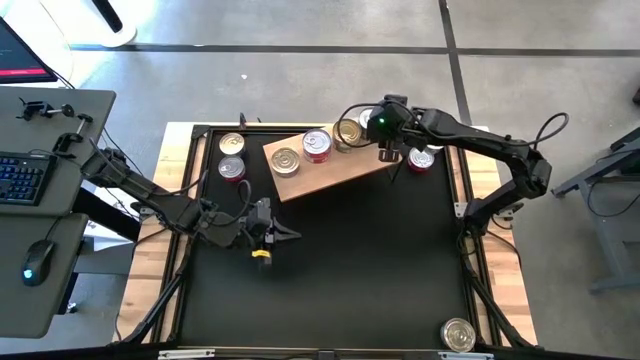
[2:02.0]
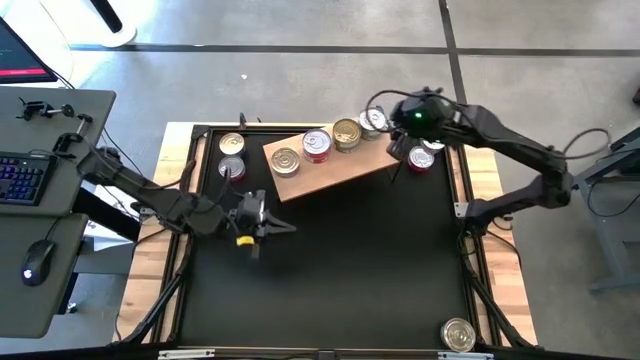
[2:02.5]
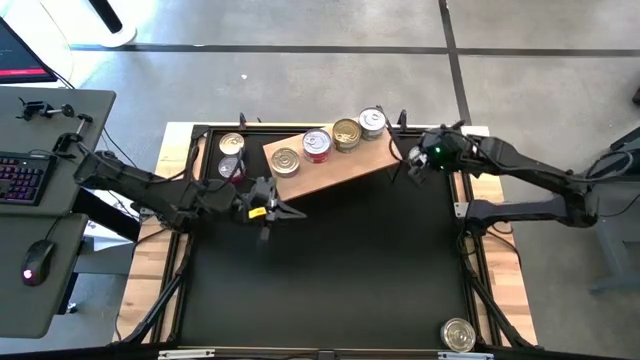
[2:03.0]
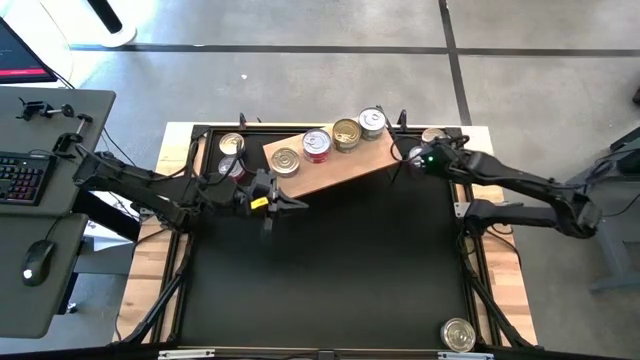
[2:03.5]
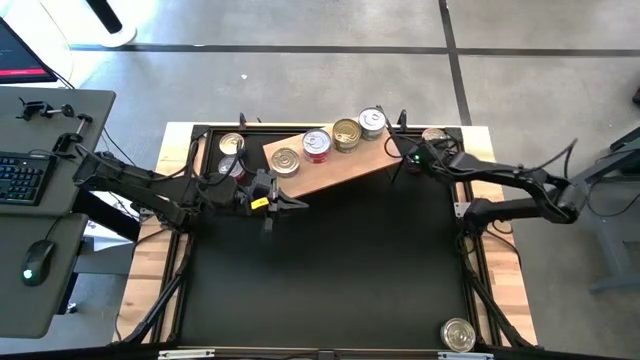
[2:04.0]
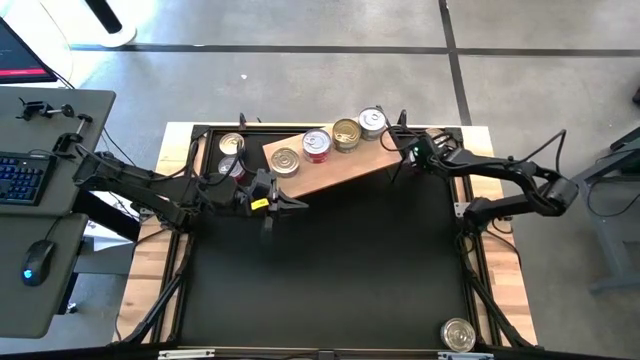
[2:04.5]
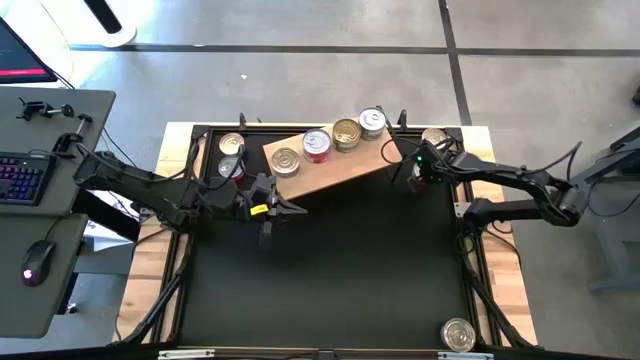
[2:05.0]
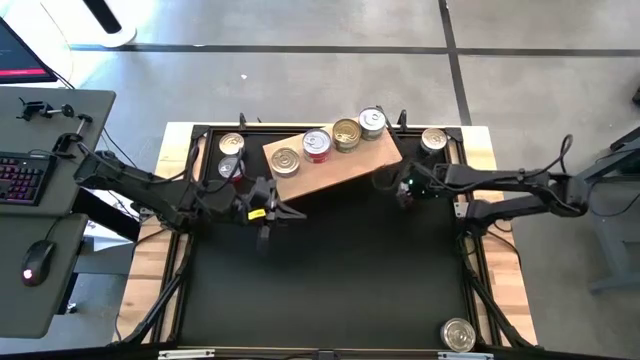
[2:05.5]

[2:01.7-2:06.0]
Task: Stack canned seafood by type on shelf
Stack the right red tuna can on top of the red tuna can on the shelf

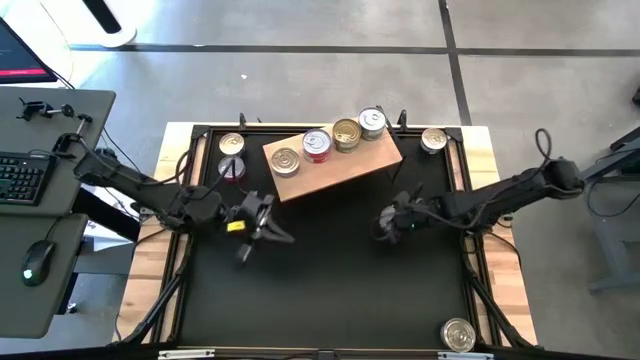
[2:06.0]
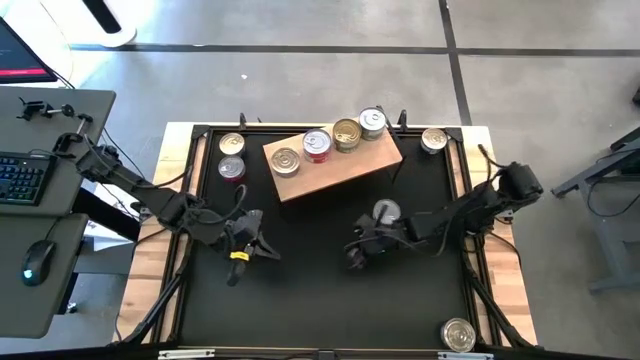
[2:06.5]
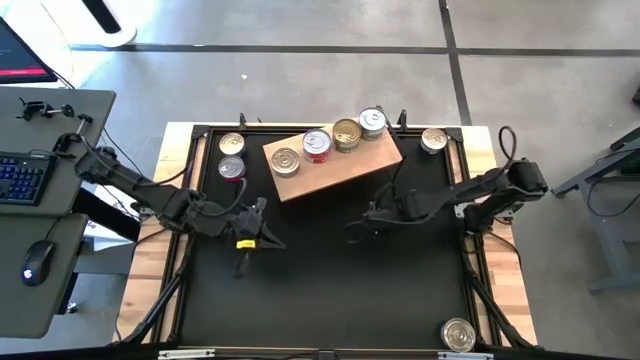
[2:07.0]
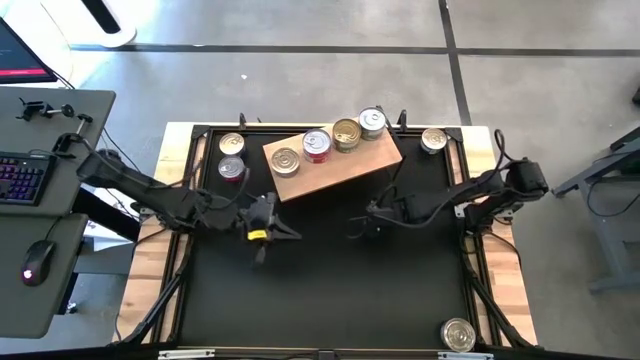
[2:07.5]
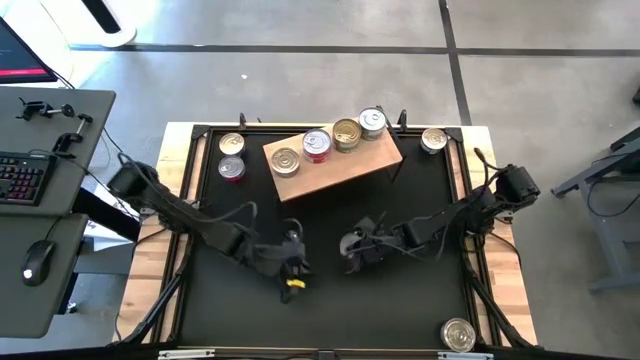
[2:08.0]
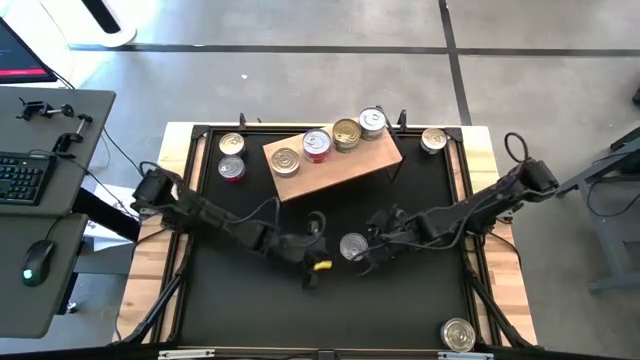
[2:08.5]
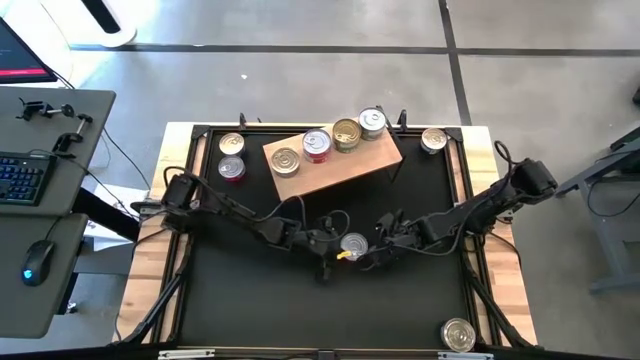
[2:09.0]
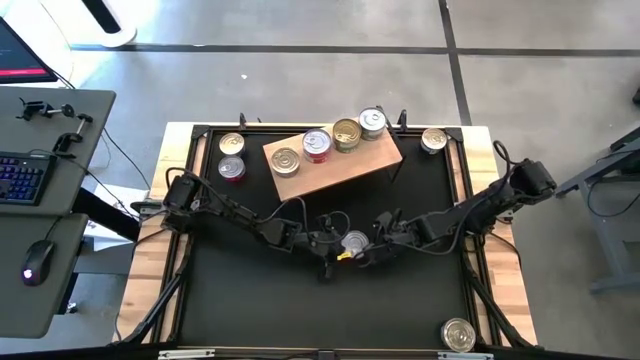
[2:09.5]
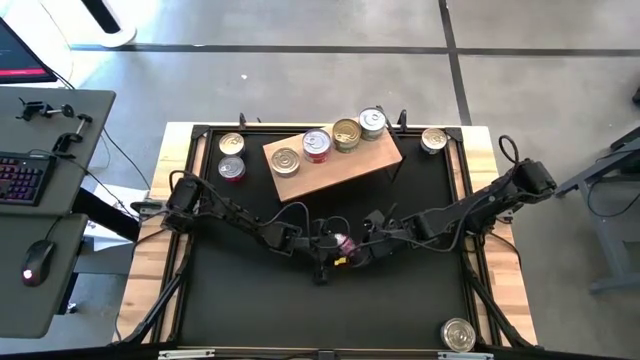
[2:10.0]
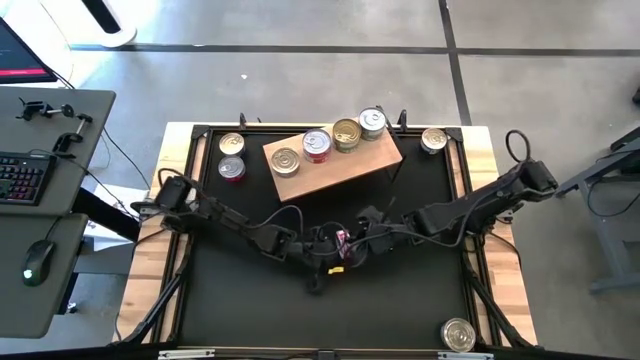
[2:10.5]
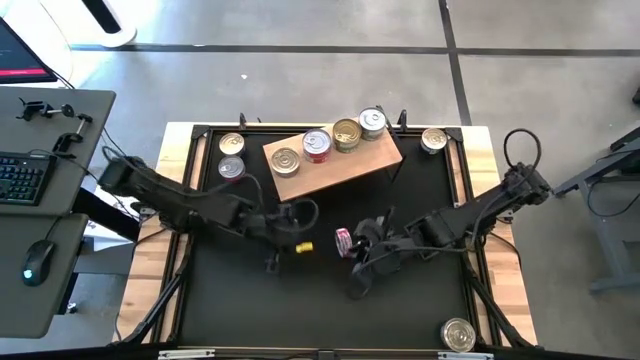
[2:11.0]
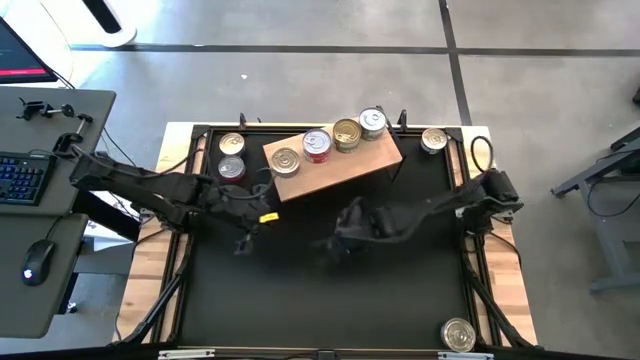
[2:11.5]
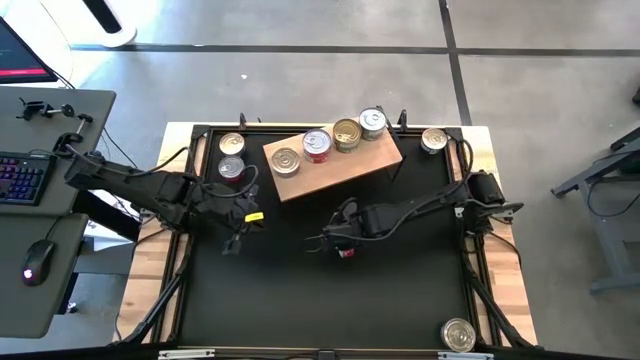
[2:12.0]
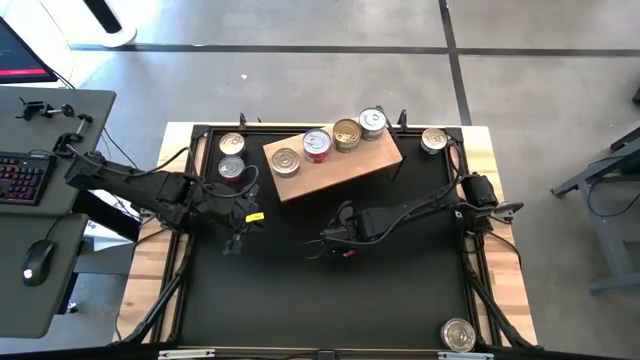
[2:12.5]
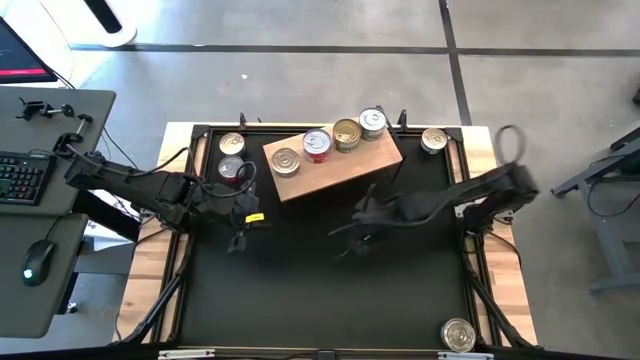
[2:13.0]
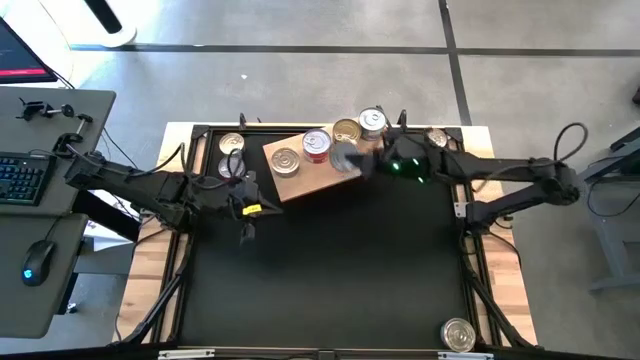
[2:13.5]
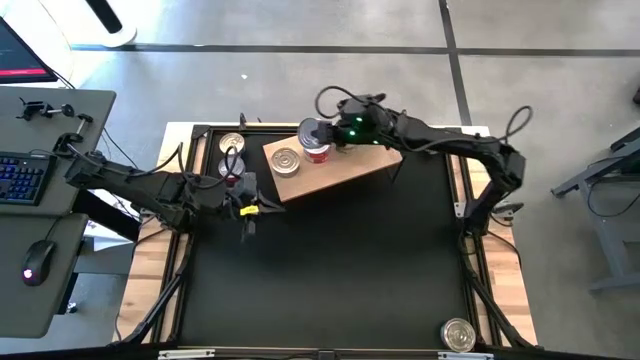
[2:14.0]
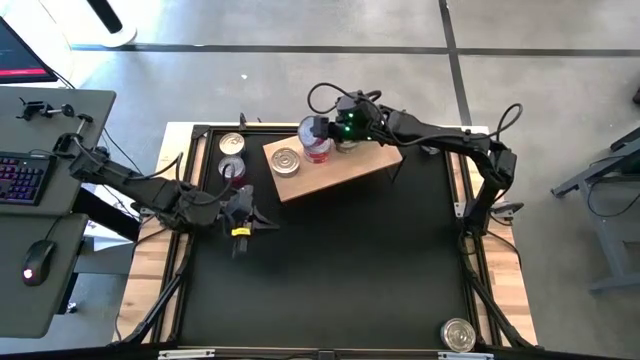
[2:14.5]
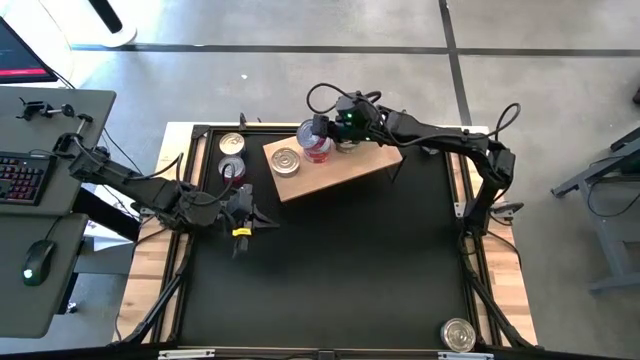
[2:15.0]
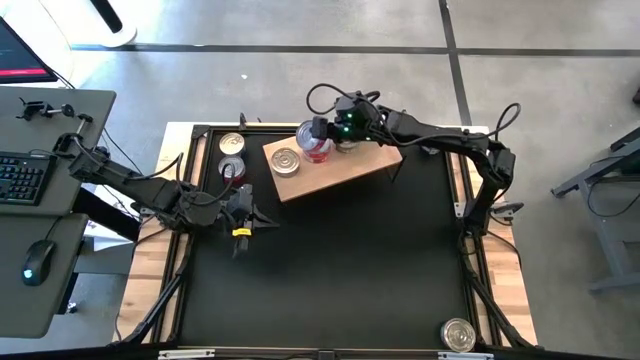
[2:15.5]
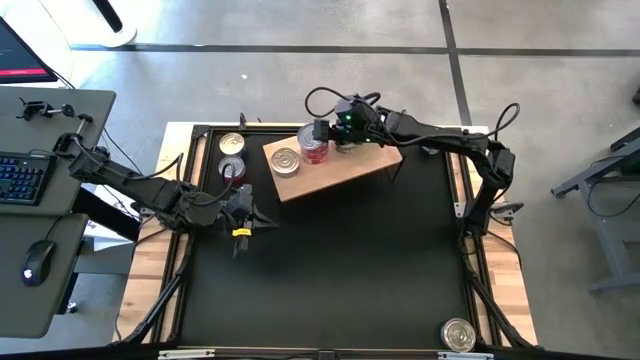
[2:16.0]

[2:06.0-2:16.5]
Stack the right red tuna can on top of the red tuna can on the shelf

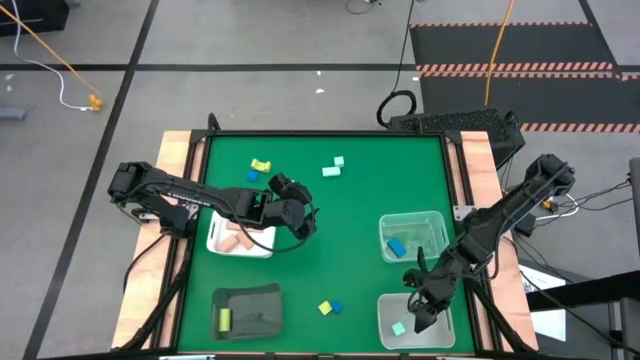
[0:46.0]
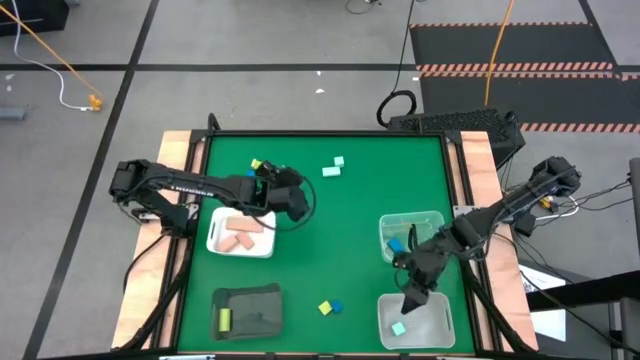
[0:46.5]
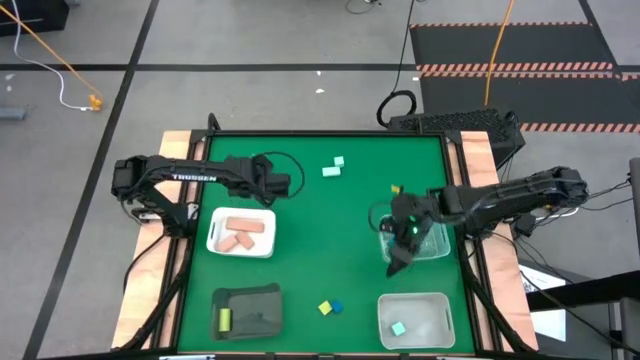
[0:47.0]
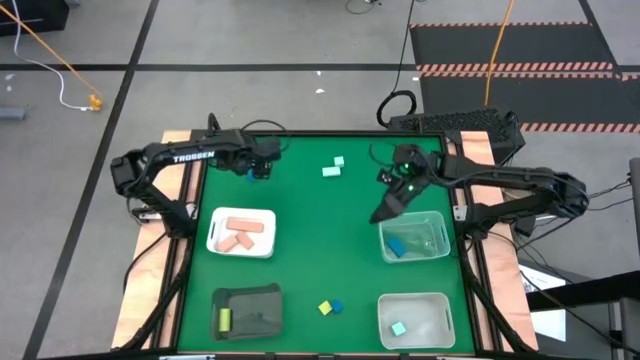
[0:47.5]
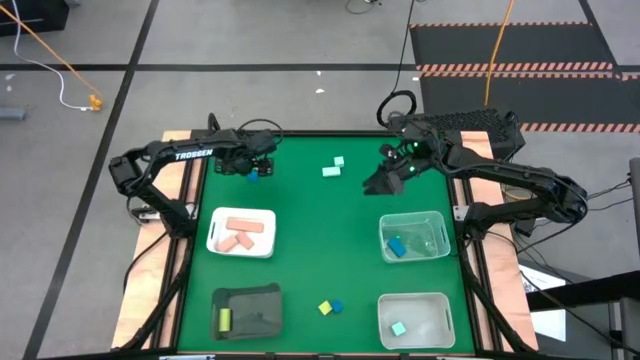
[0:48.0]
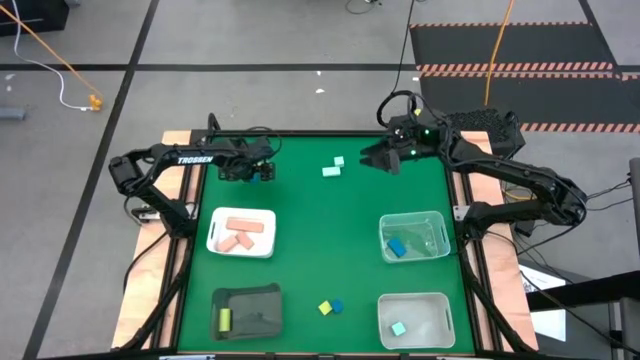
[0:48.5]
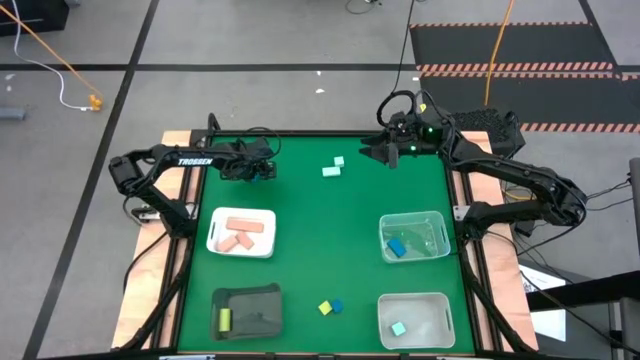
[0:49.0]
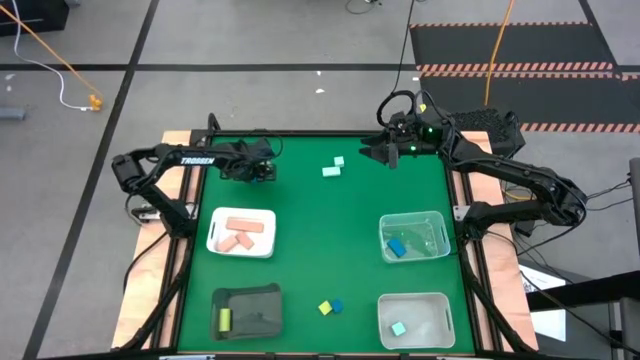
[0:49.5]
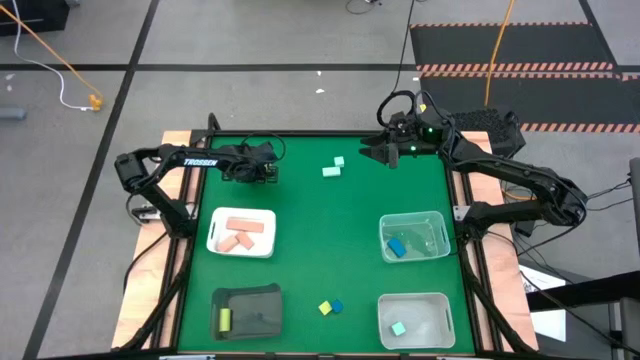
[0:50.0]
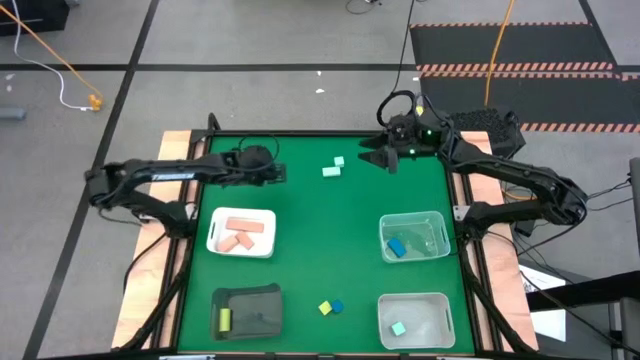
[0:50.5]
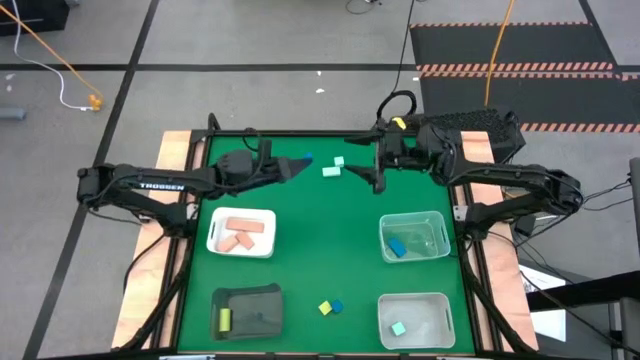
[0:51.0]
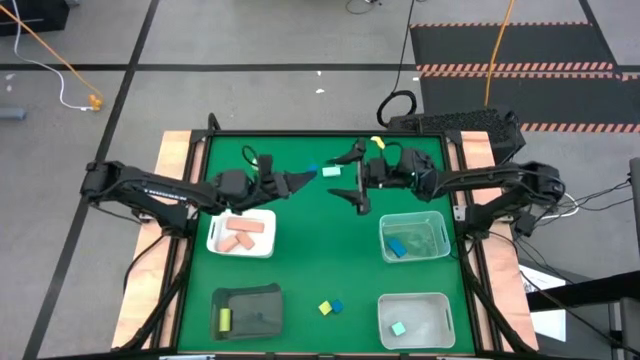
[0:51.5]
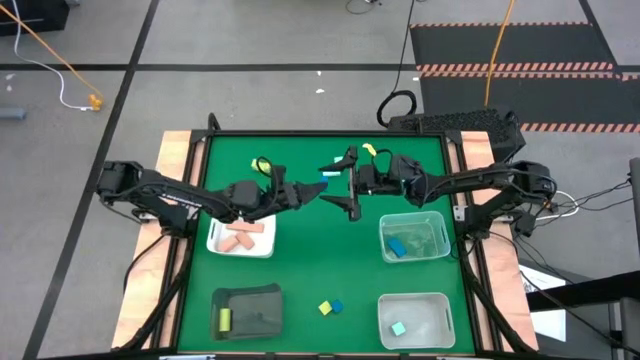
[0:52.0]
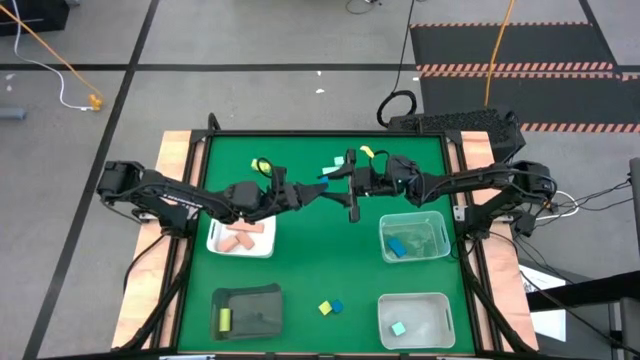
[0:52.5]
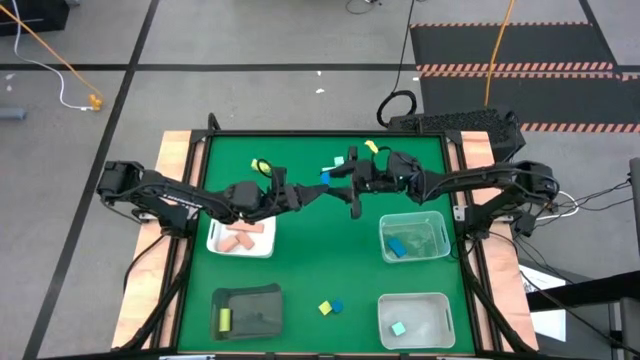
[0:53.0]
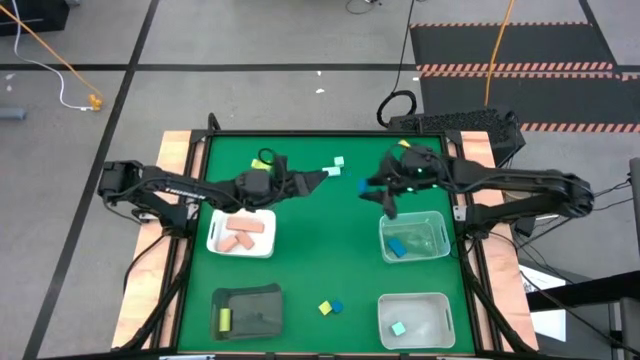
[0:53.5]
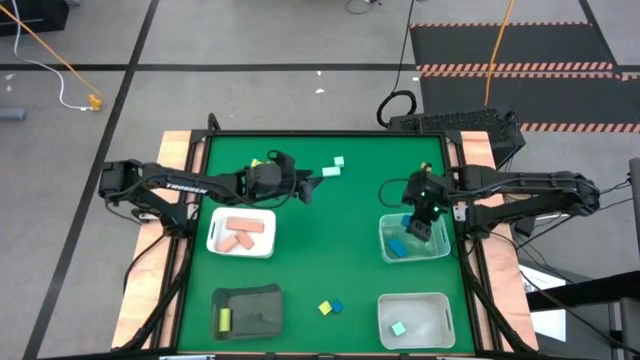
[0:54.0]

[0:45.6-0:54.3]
Task: Sort & place blocks by color
Put the top blue block into the transparent bin
